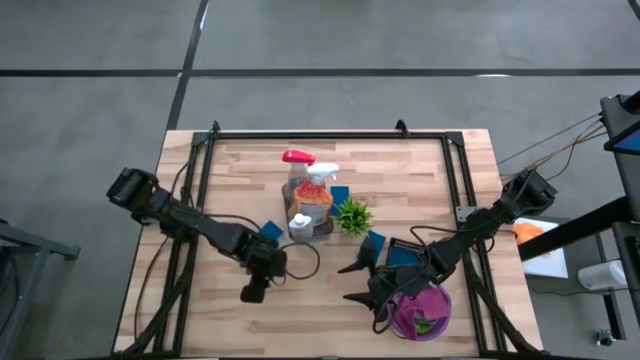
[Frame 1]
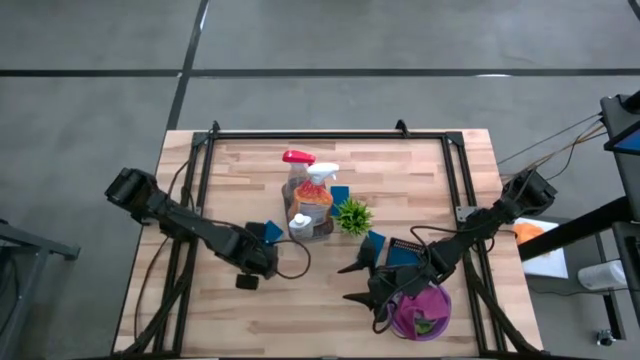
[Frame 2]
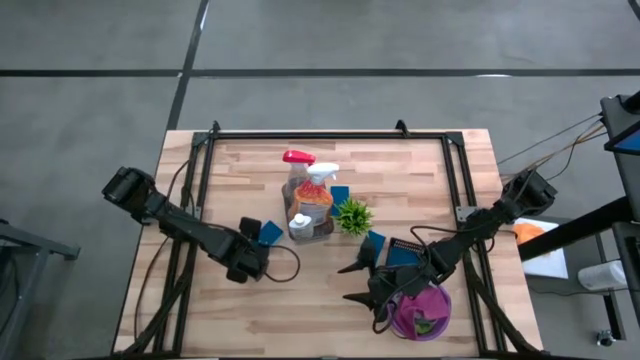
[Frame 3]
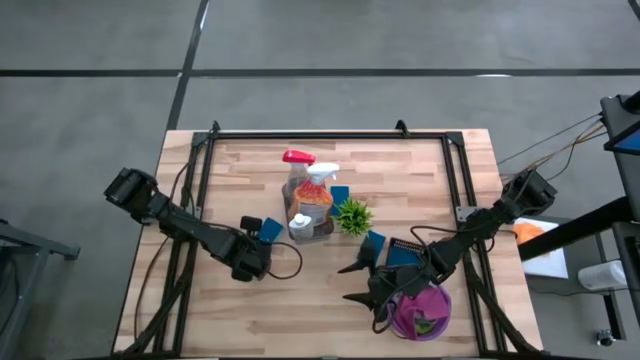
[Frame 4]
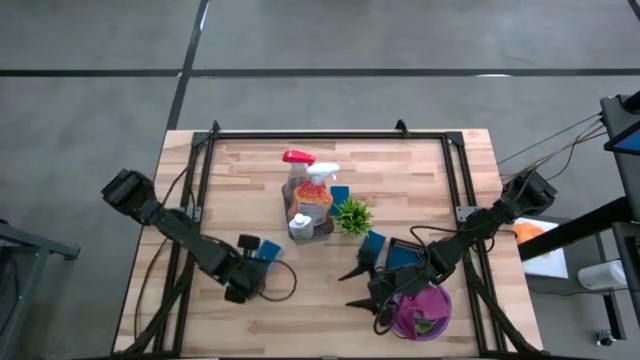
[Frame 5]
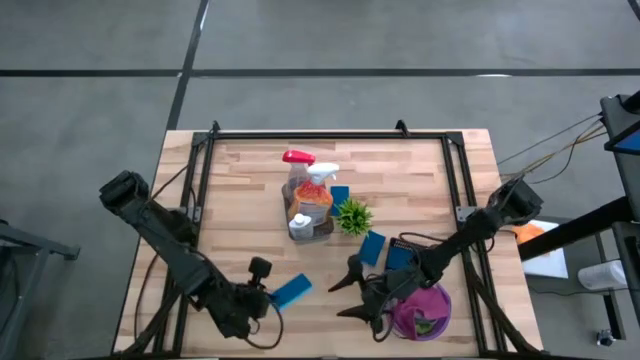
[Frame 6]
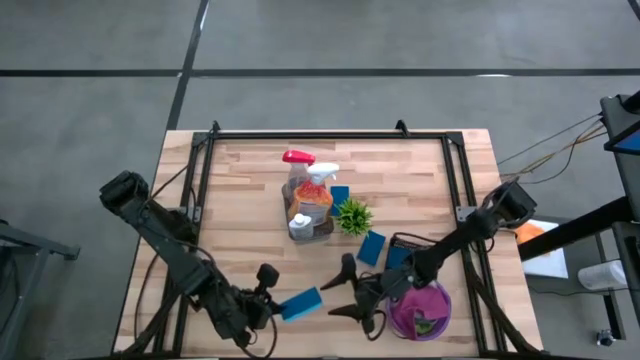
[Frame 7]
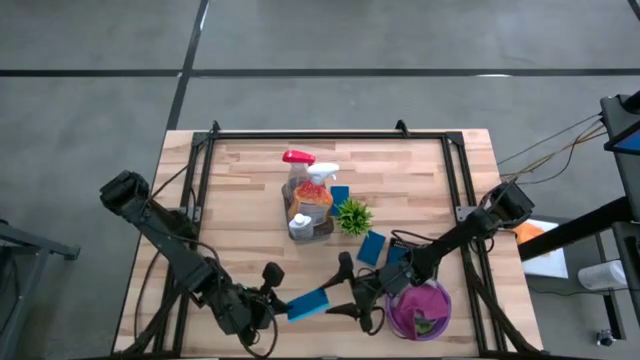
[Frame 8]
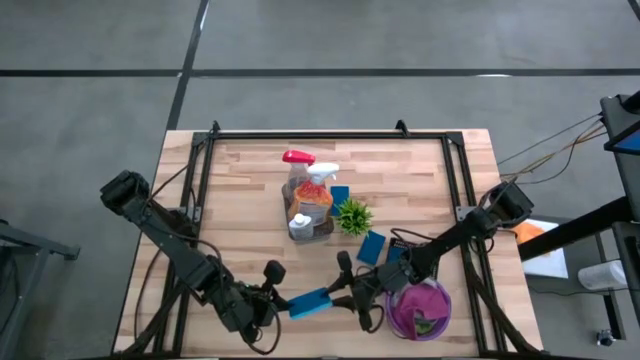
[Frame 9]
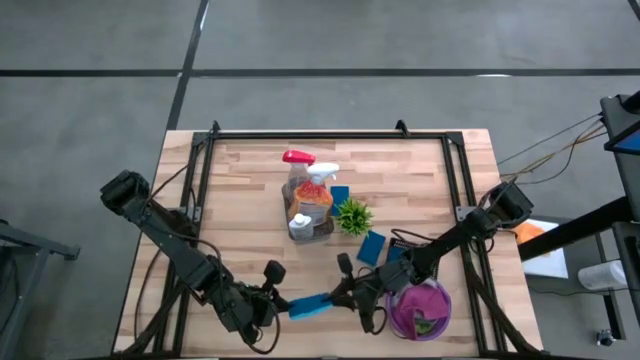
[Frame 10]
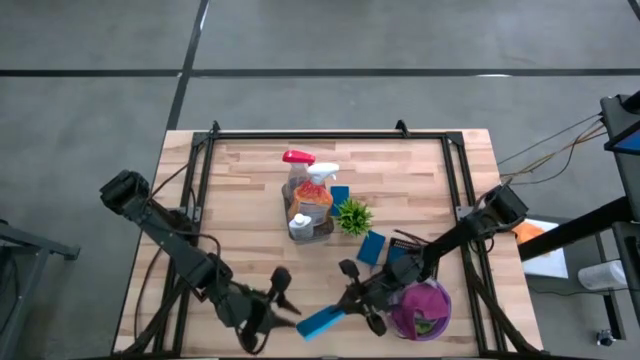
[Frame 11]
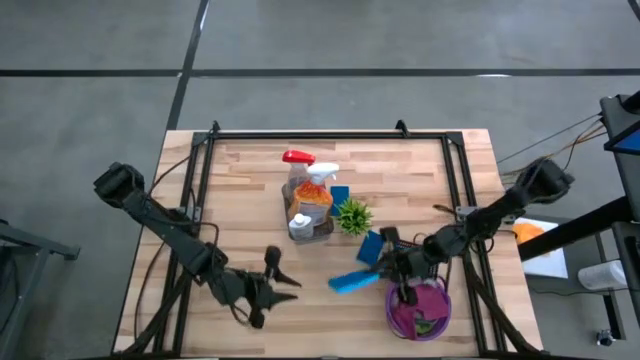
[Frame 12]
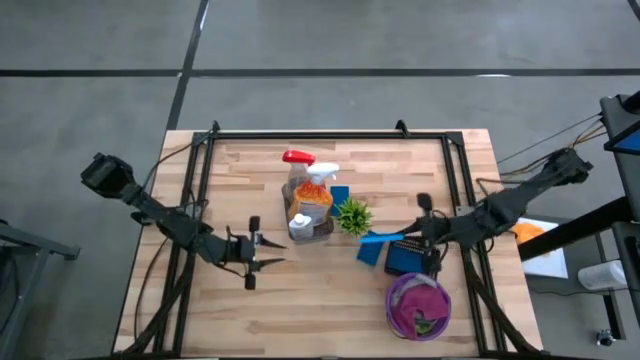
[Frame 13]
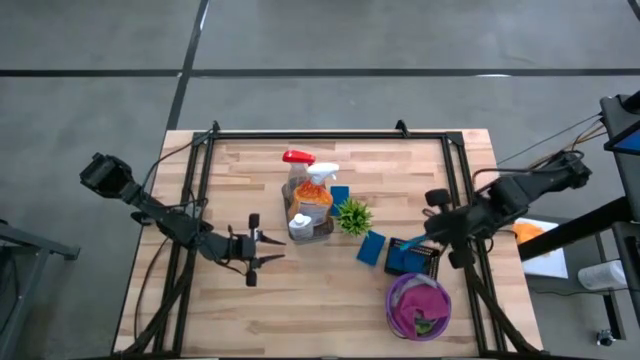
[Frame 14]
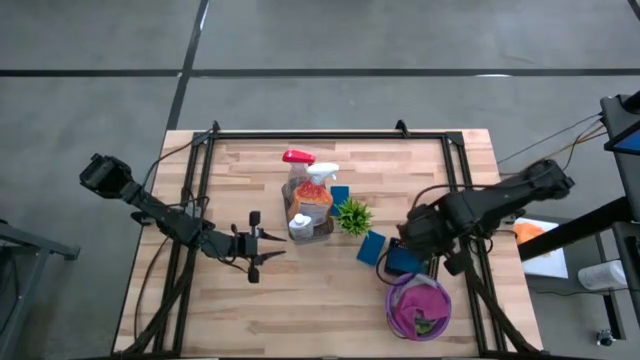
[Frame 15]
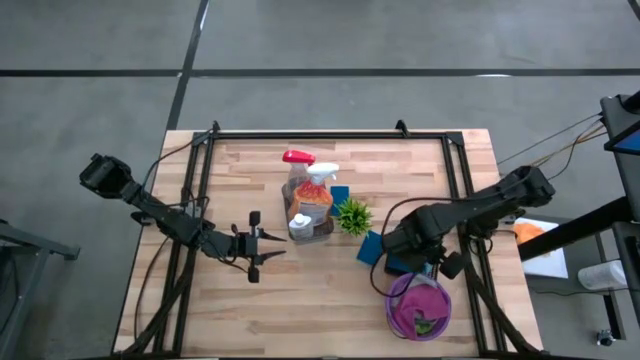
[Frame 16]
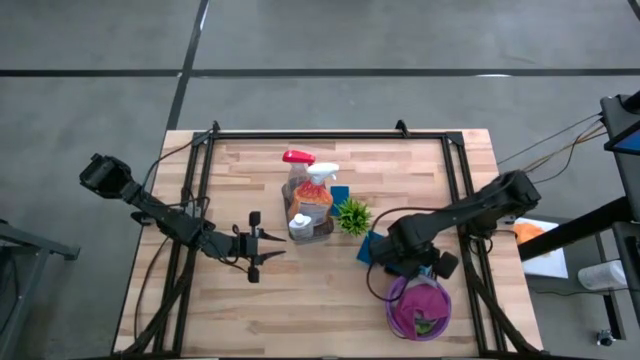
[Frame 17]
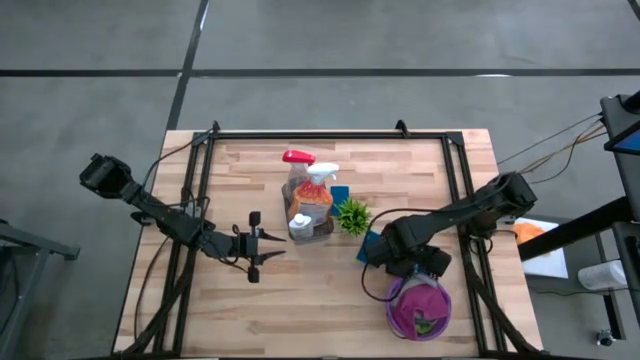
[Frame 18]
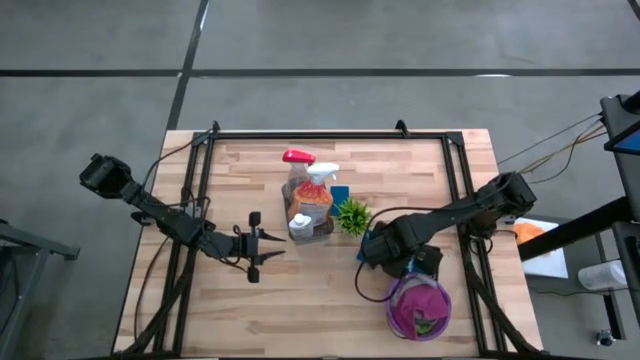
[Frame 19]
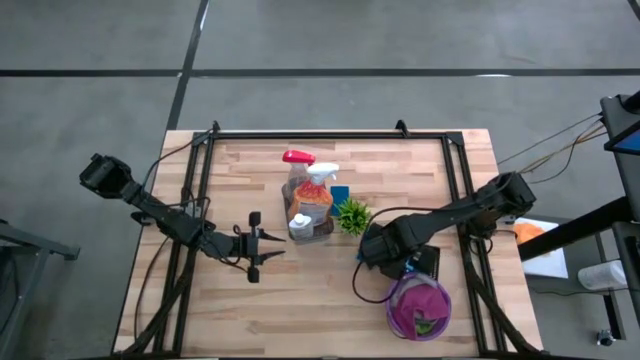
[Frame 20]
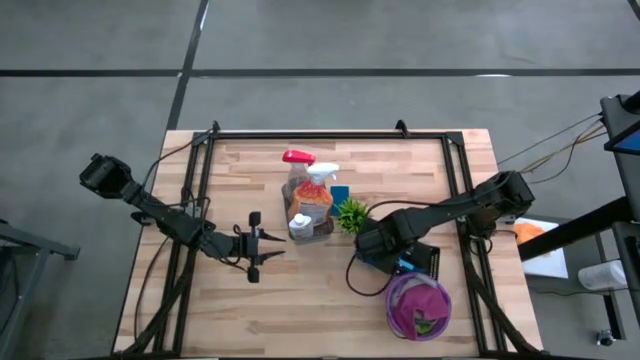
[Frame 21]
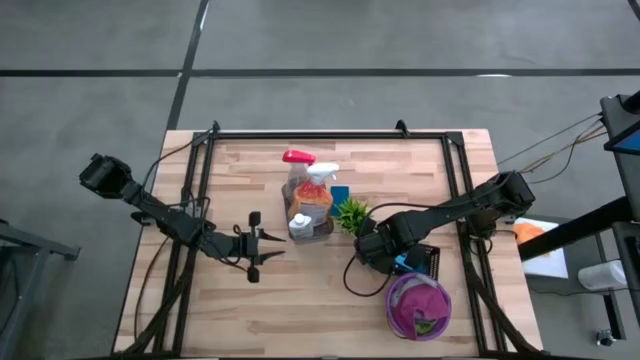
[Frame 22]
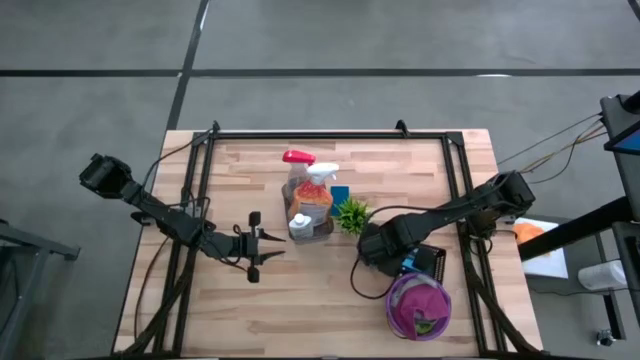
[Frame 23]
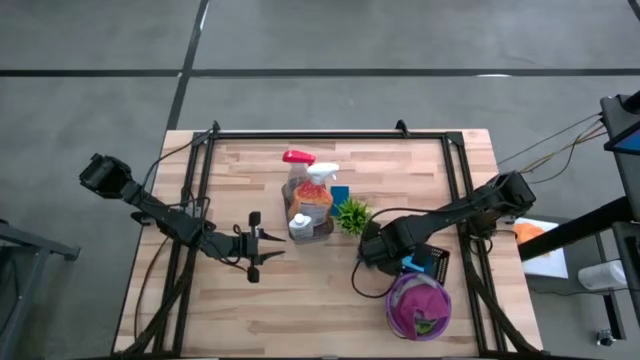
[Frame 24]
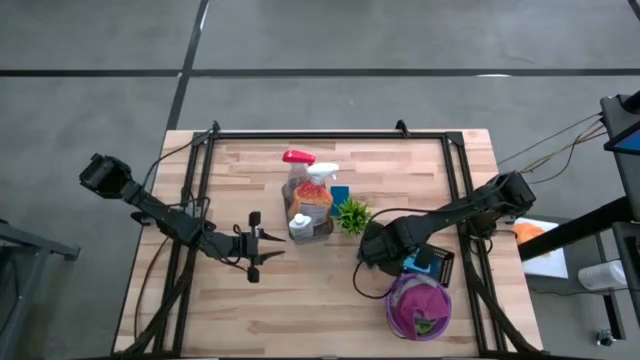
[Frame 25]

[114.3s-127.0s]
Task: Pick & Place Kitchen Items
Put the blue sponge into the black bin
